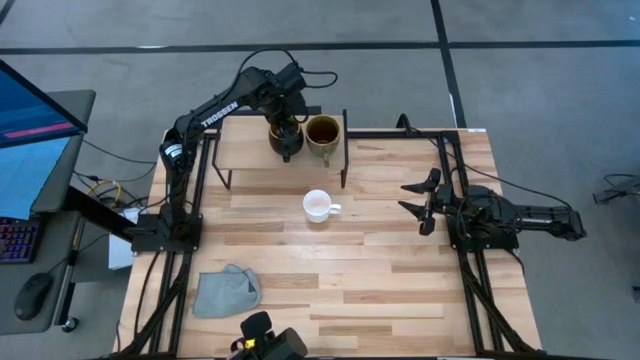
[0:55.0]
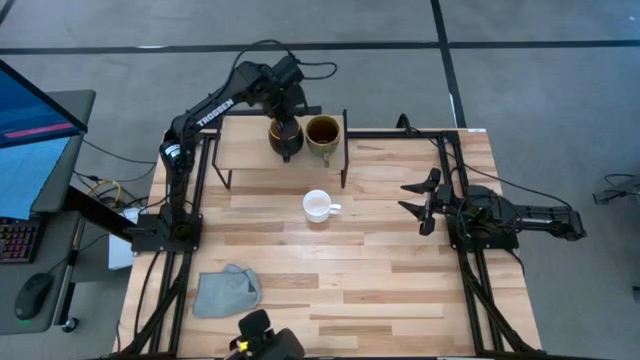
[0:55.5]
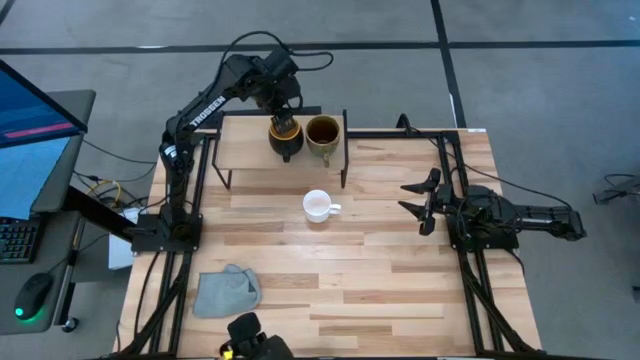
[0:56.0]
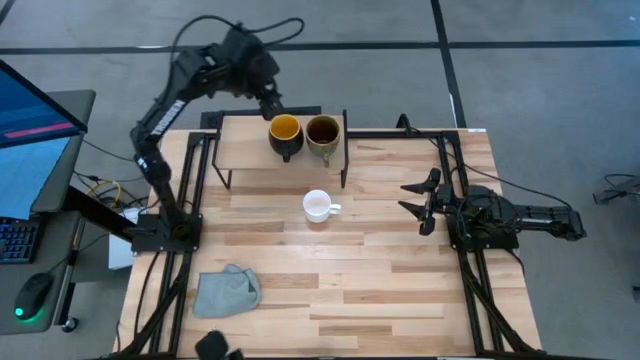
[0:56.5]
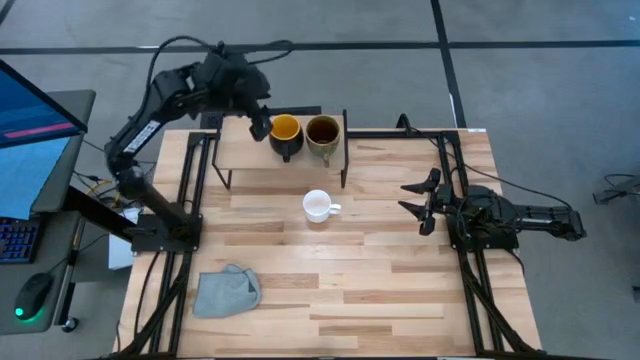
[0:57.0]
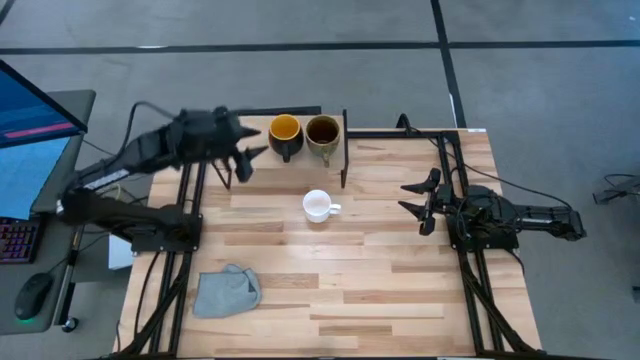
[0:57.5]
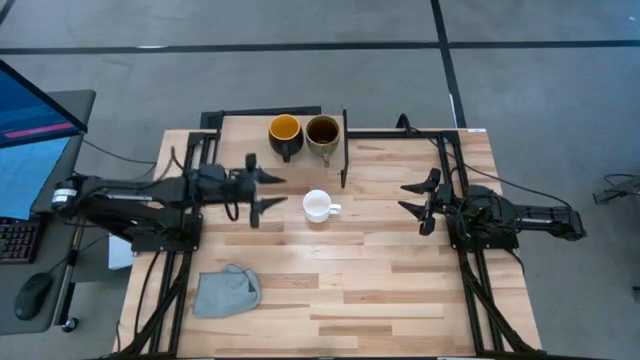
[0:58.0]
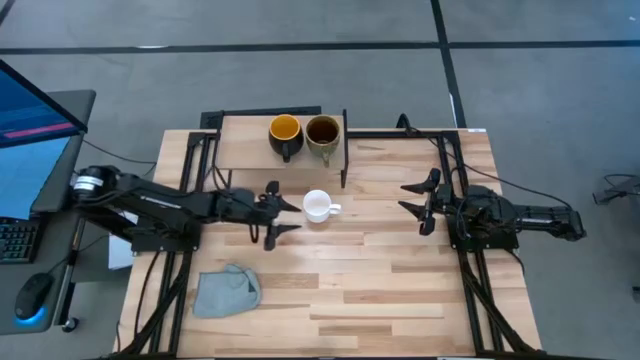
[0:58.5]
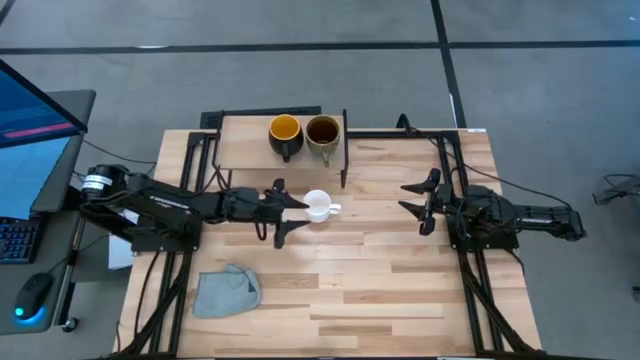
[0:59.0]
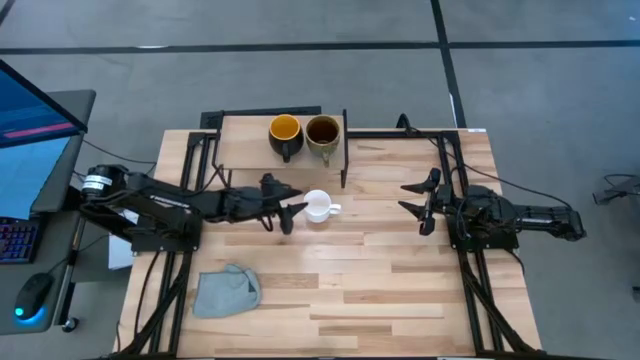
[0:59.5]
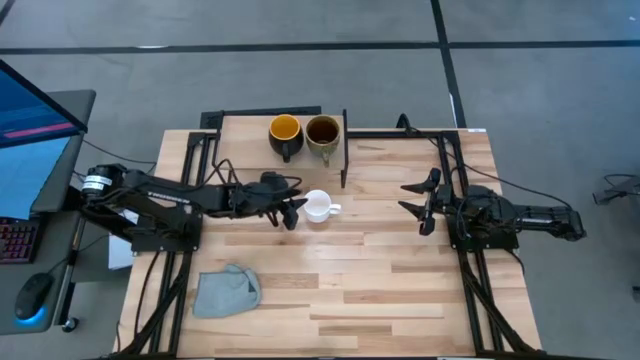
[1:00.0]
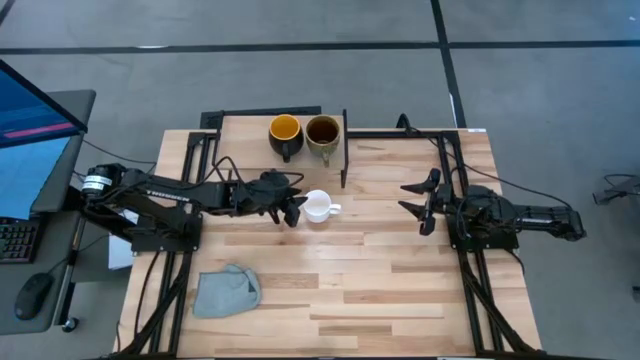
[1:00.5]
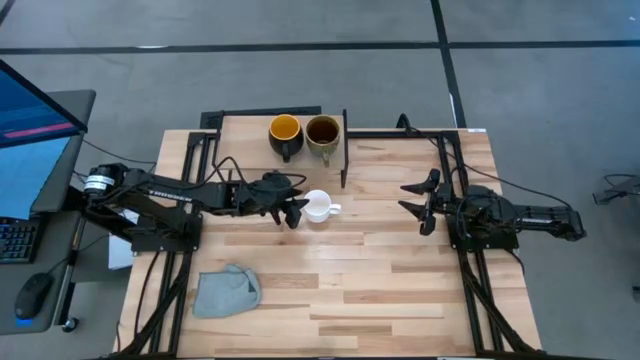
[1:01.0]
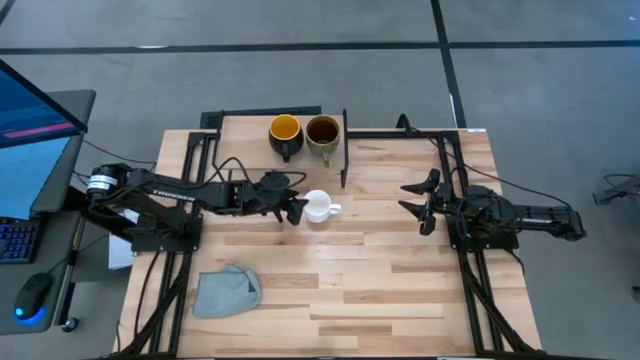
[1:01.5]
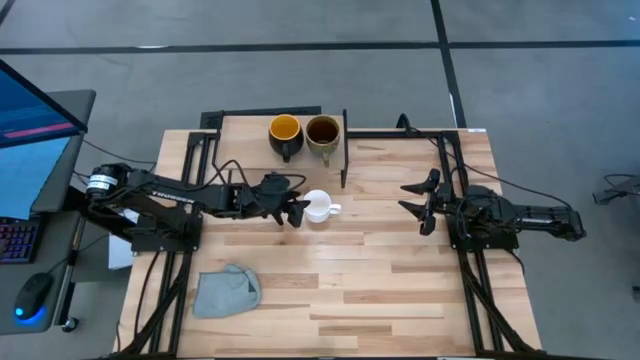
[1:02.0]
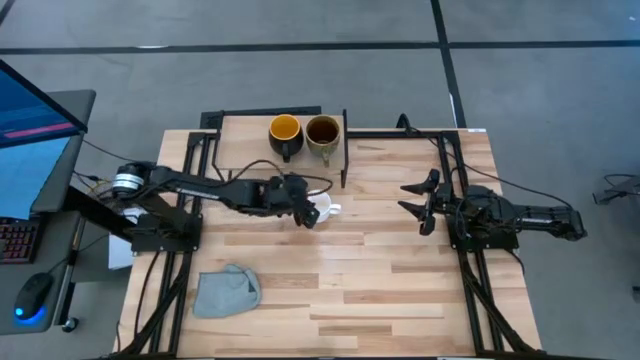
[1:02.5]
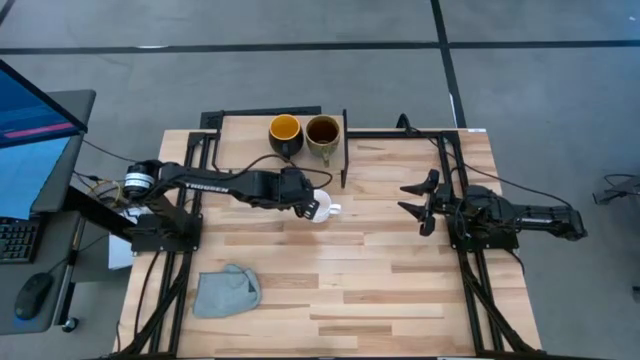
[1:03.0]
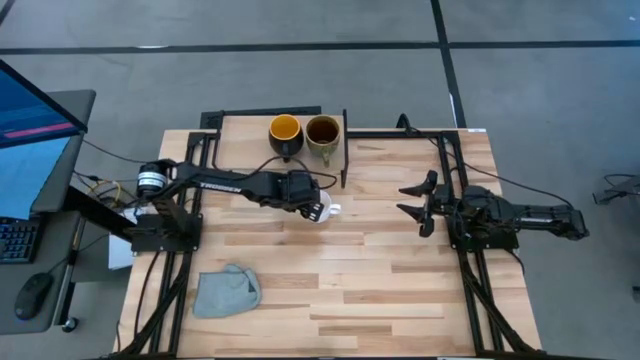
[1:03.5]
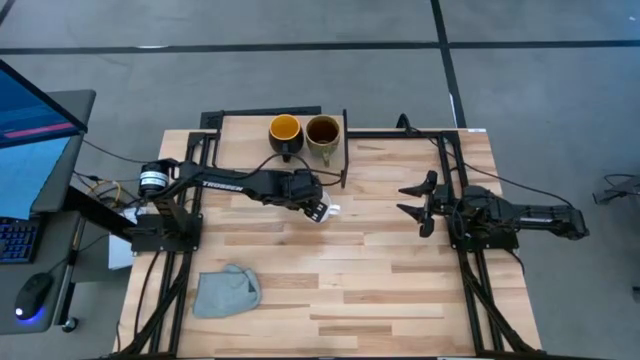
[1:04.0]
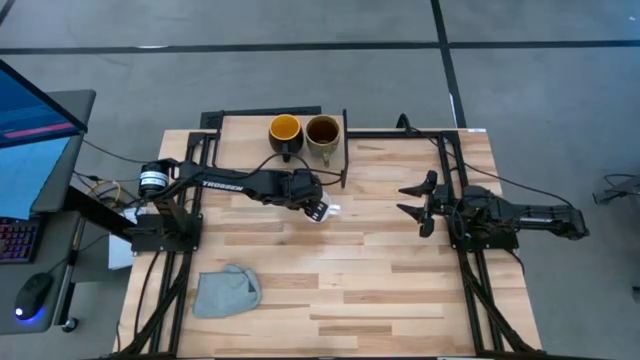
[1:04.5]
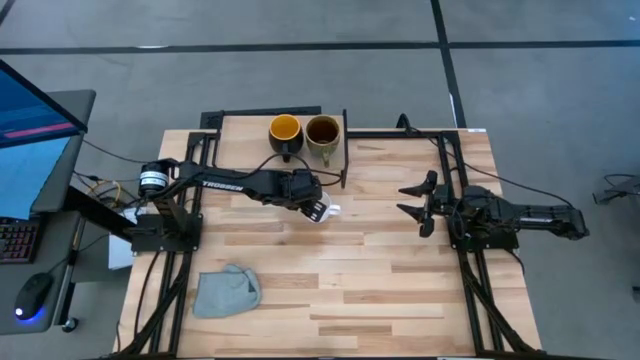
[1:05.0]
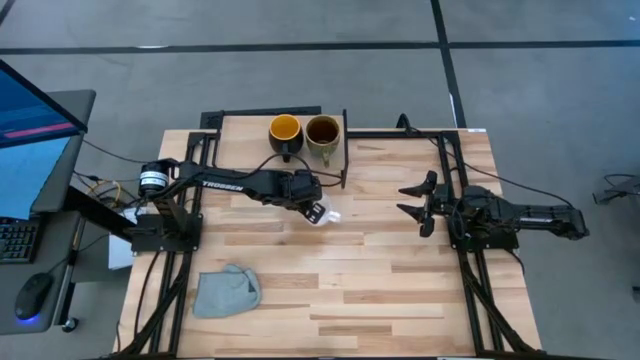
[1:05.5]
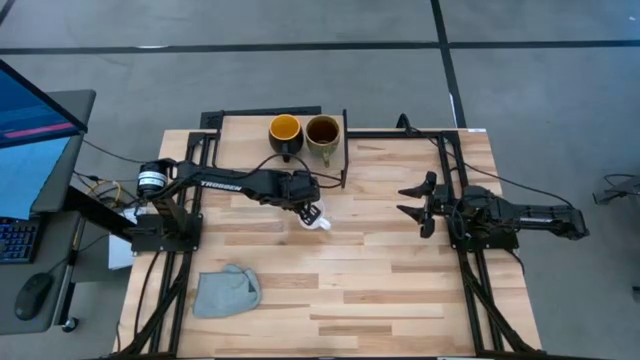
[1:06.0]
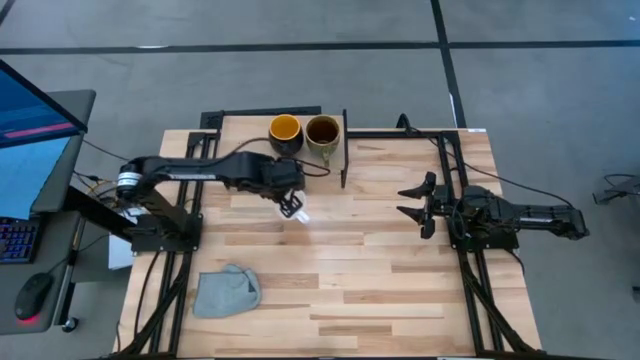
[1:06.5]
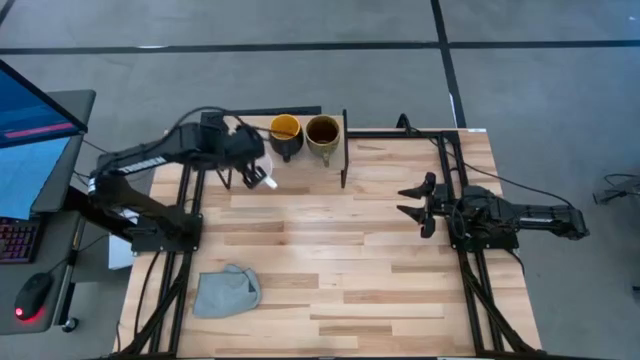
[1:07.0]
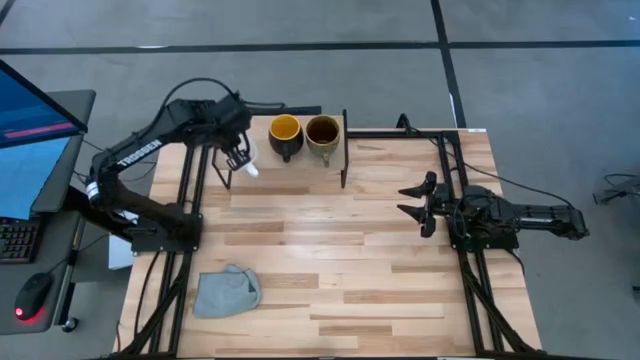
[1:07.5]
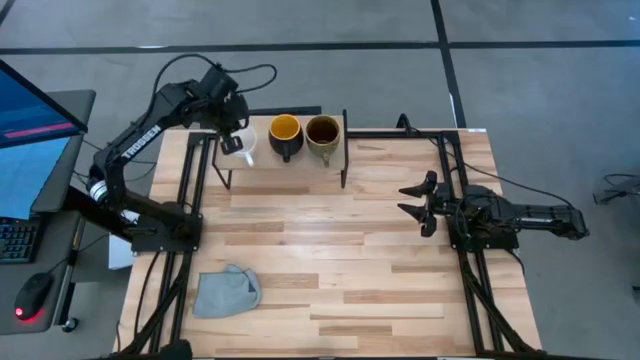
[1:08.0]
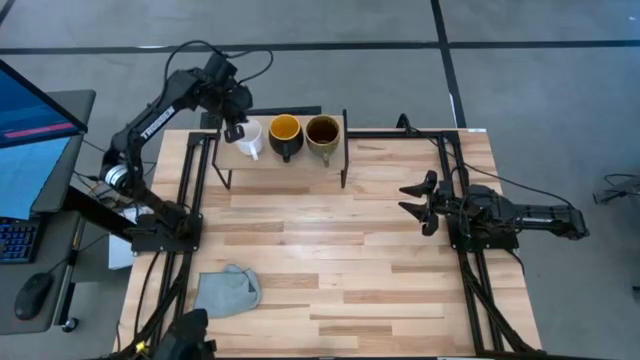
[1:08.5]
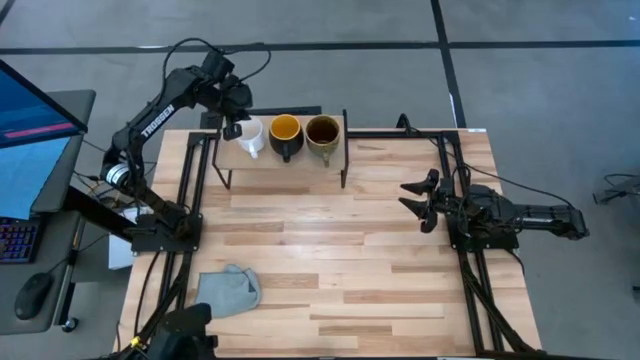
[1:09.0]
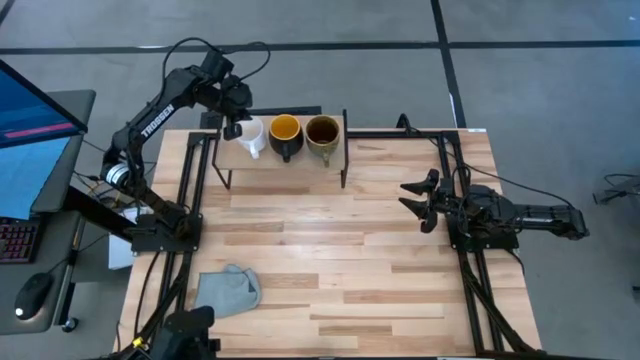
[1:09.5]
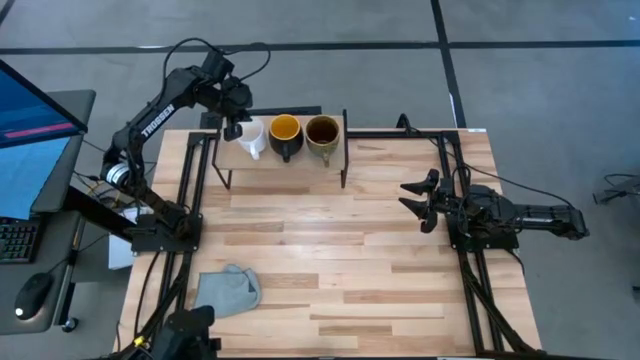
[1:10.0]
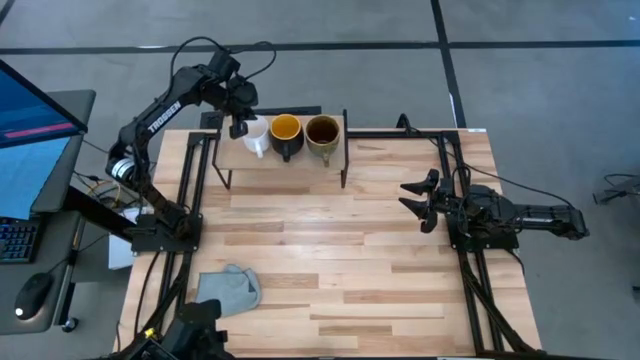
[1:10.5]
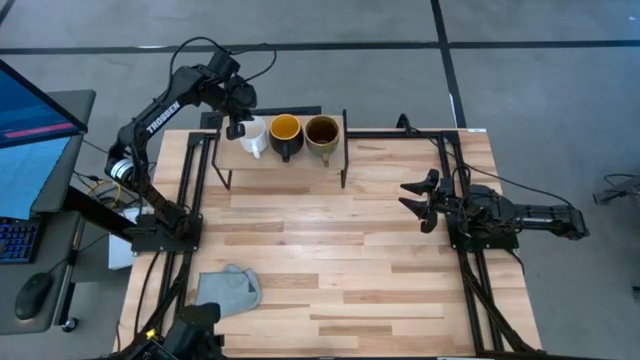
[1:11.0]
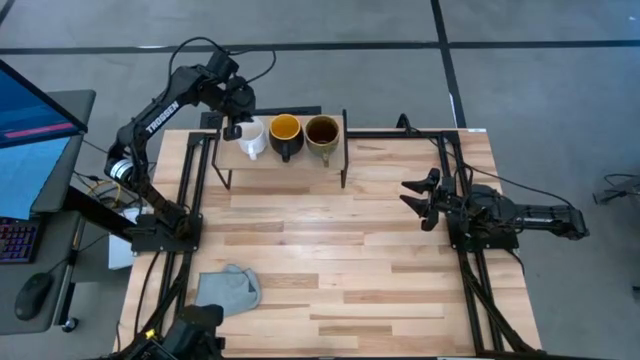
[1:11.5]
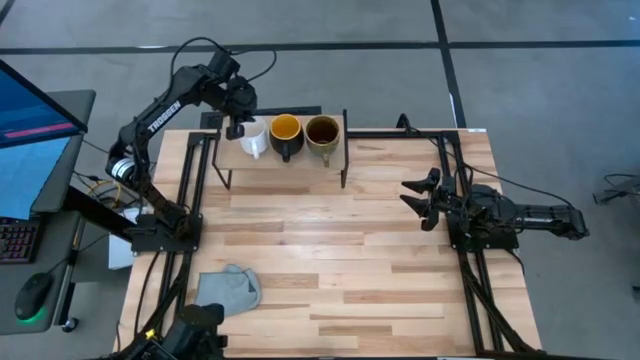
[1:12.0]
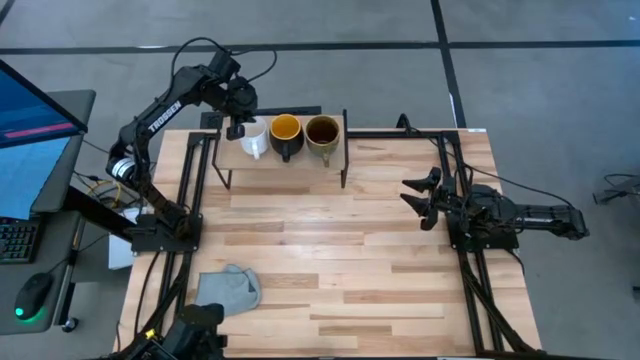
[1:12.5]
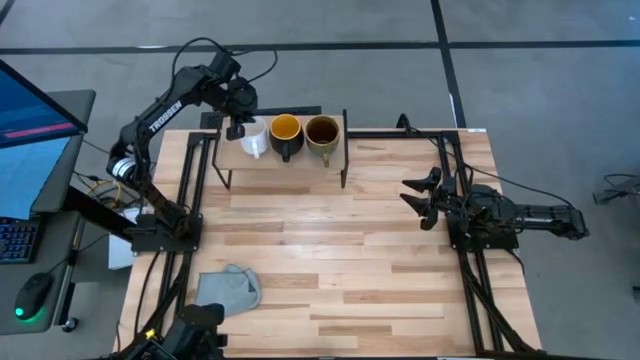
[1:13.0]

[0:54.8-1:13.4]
Task: Stack small to large cups/mugs on shelf
Put the white mug on the shelf

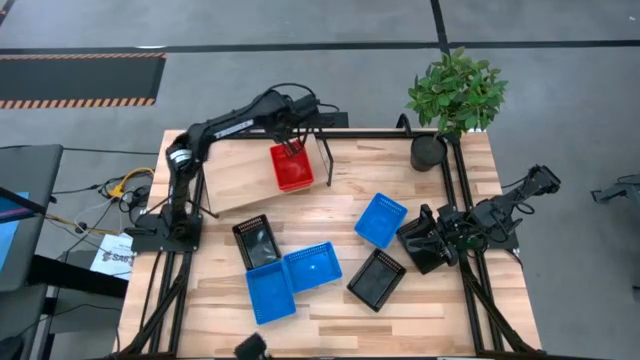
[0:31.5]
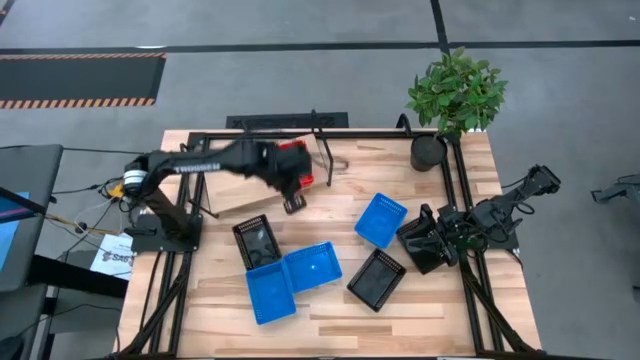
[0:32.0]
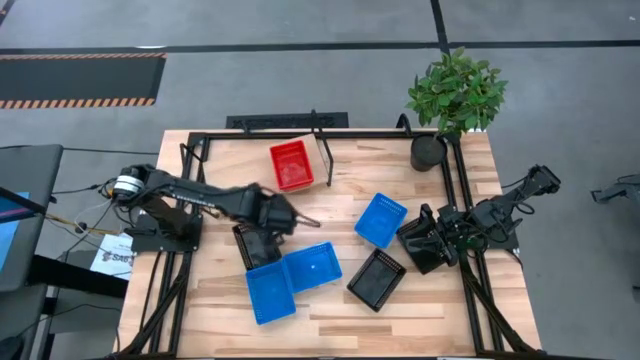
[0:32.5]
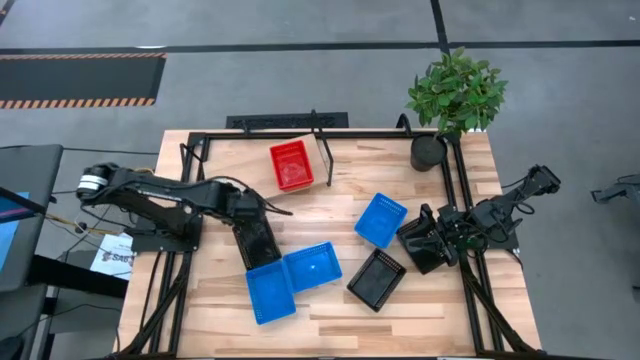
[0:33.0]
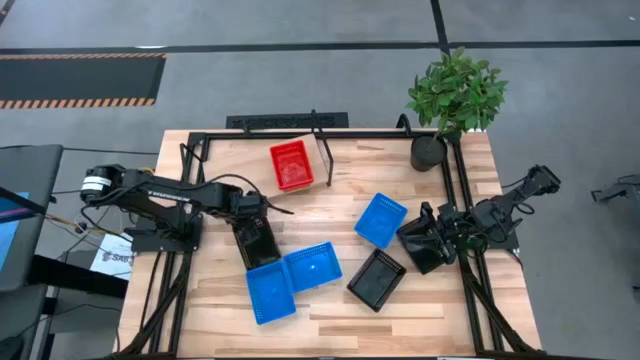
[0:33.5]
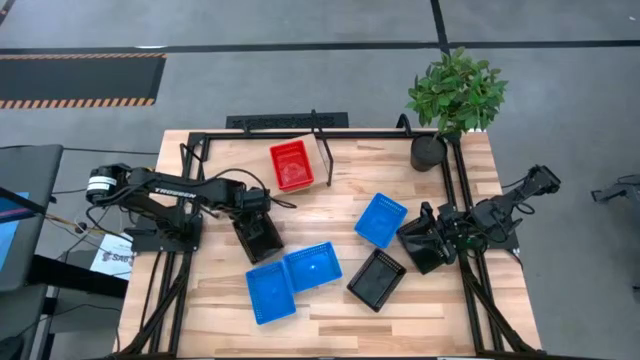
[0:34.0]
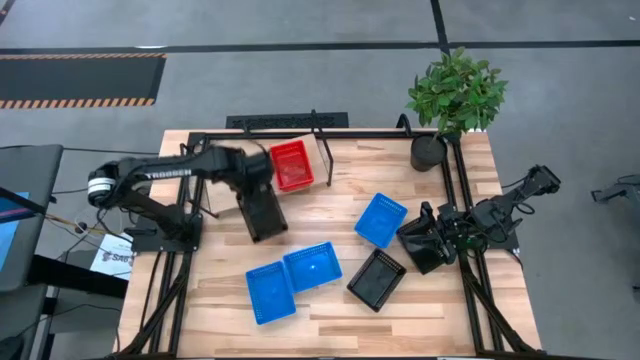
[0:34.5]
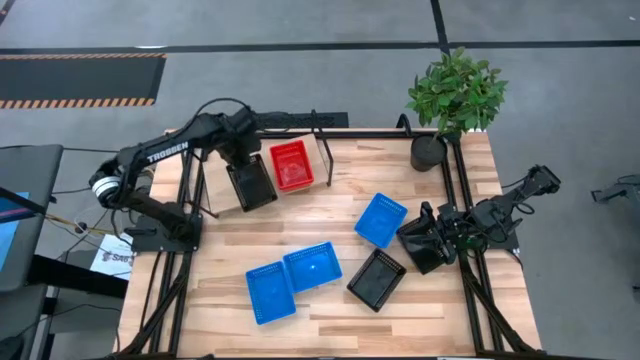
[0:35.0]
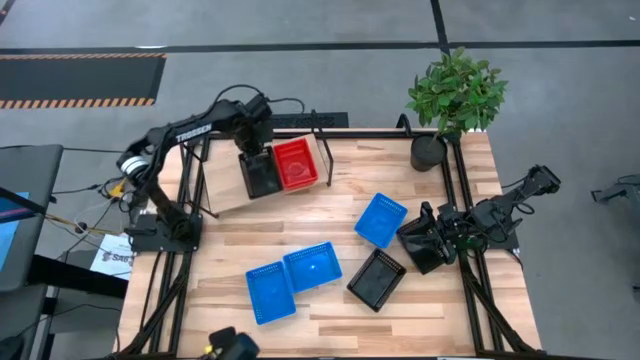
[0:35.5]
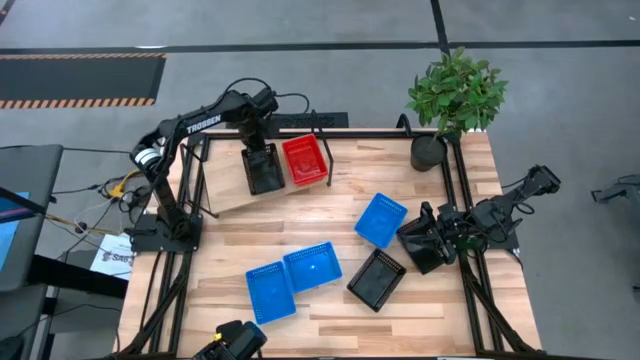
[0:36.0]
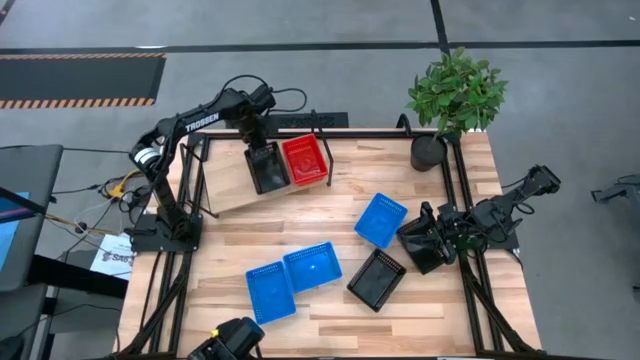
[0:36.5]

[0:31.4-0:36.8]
Task: Stack baskets on shelf by color
Put the top black bin on the shelf
